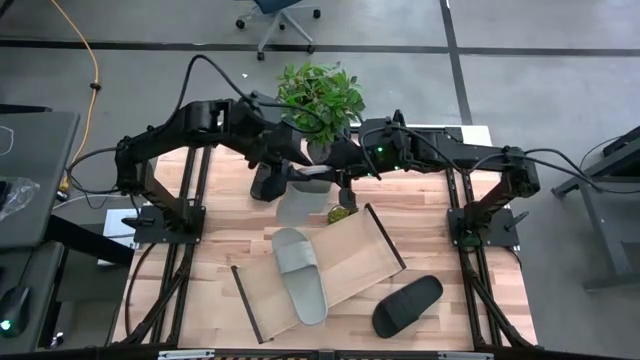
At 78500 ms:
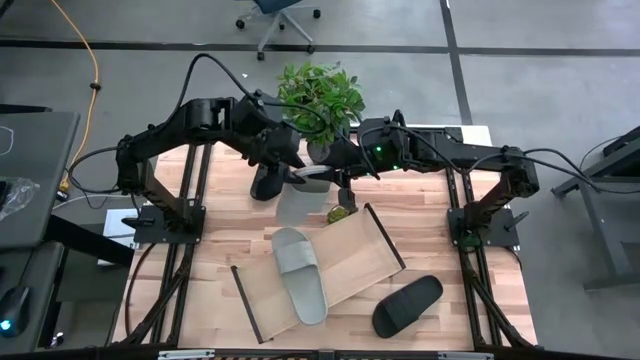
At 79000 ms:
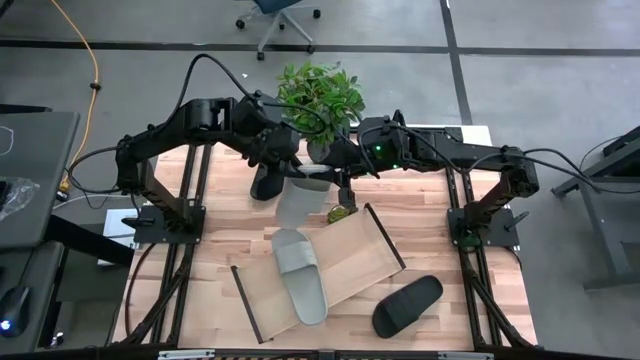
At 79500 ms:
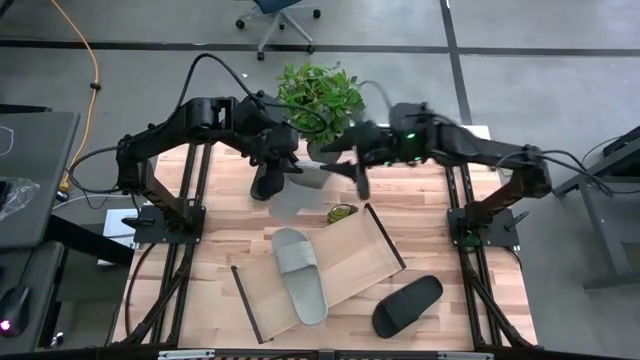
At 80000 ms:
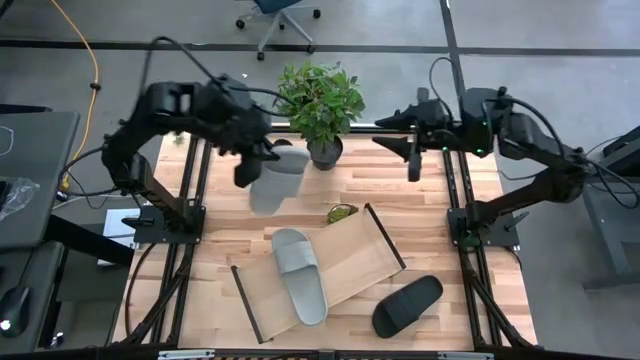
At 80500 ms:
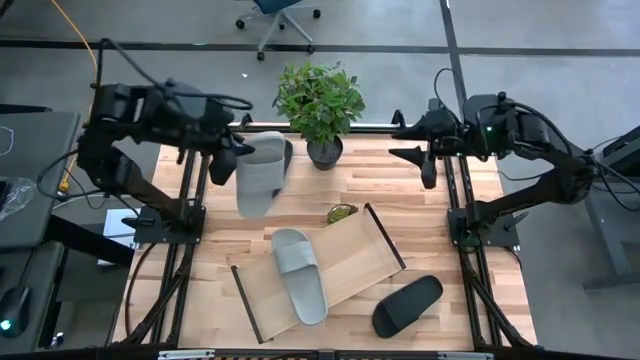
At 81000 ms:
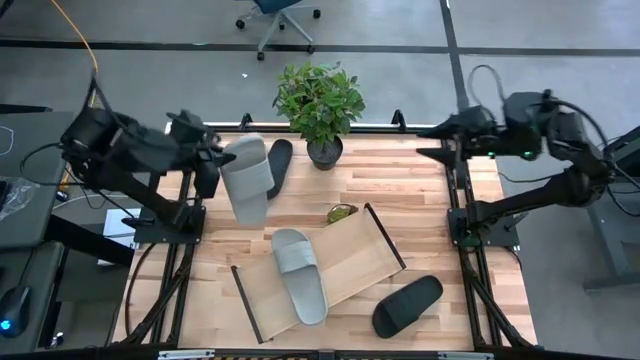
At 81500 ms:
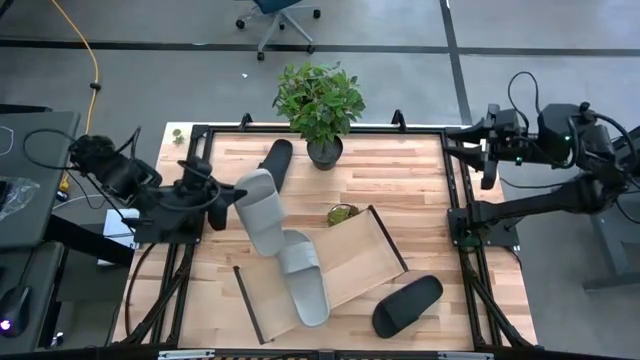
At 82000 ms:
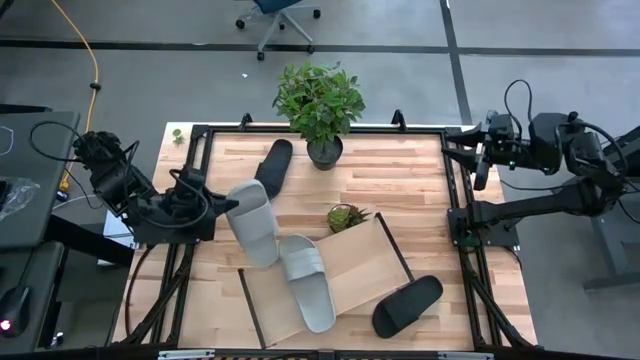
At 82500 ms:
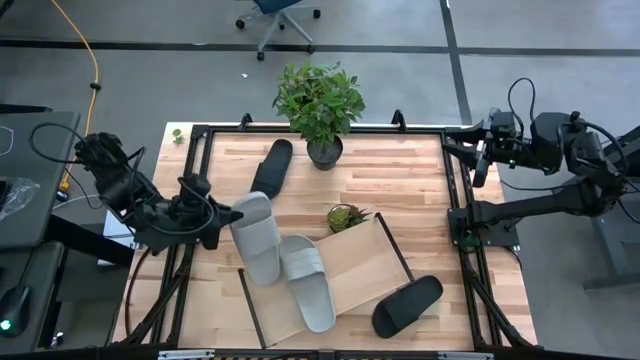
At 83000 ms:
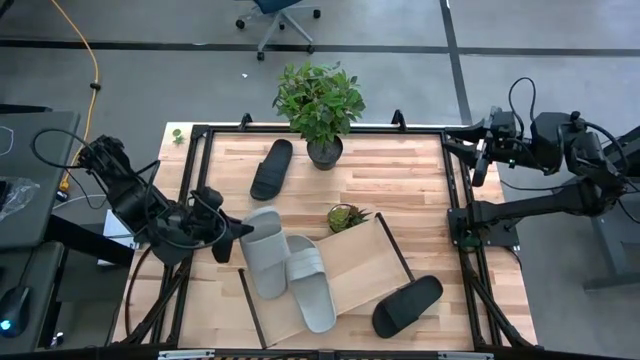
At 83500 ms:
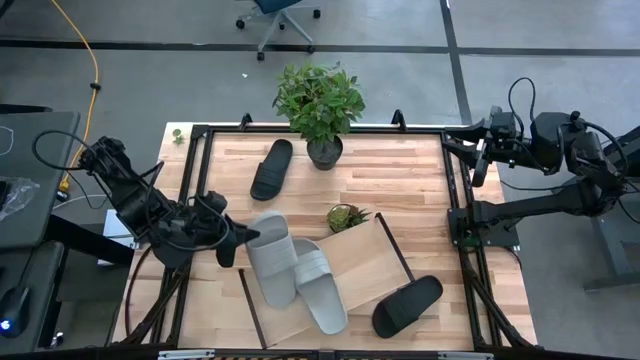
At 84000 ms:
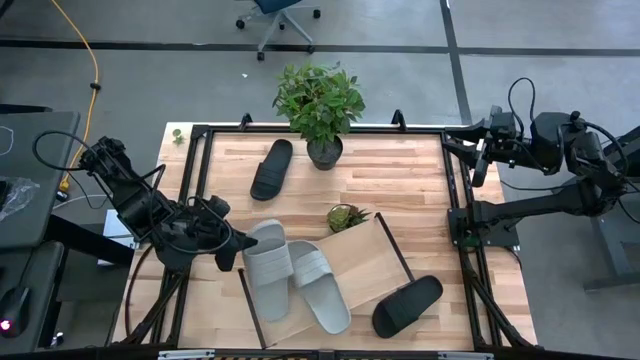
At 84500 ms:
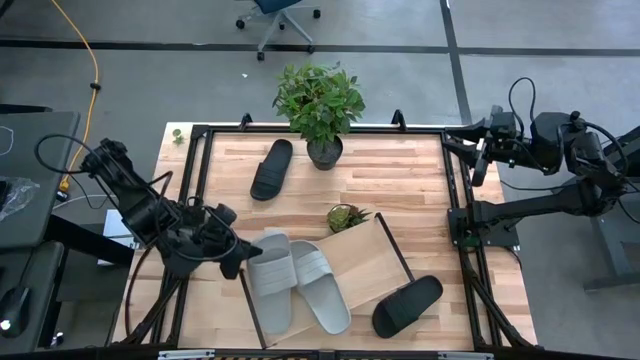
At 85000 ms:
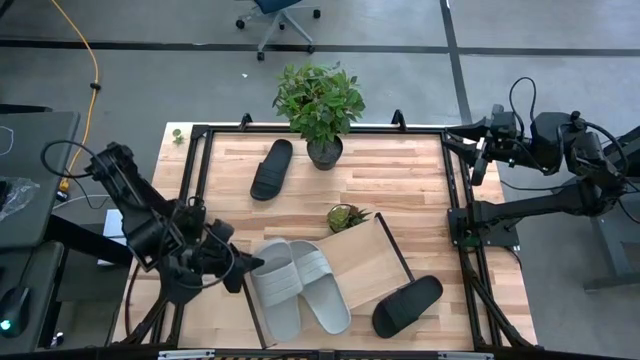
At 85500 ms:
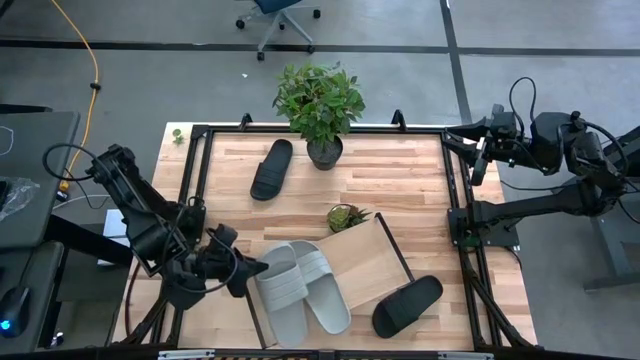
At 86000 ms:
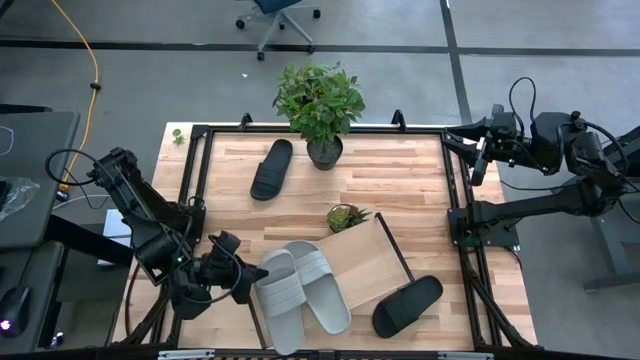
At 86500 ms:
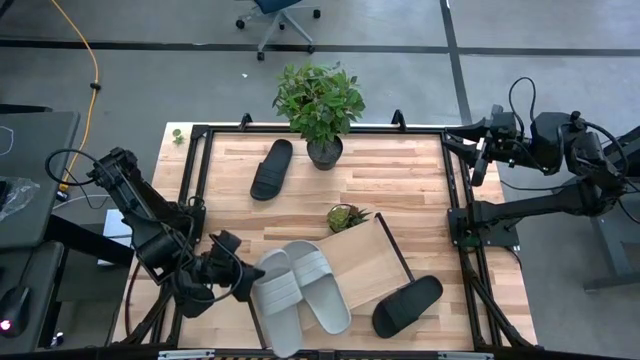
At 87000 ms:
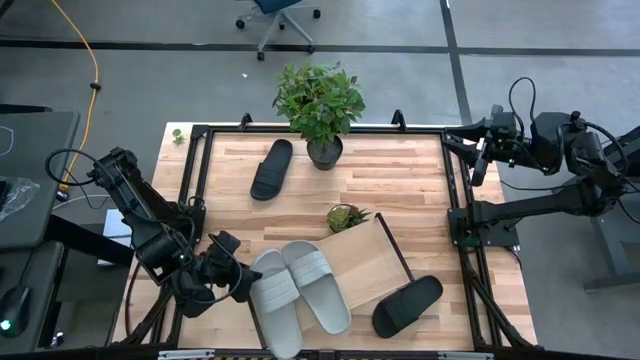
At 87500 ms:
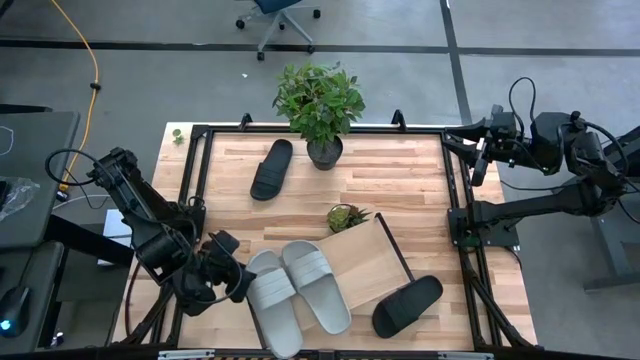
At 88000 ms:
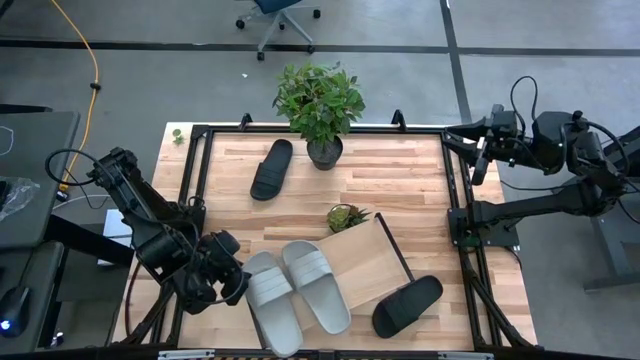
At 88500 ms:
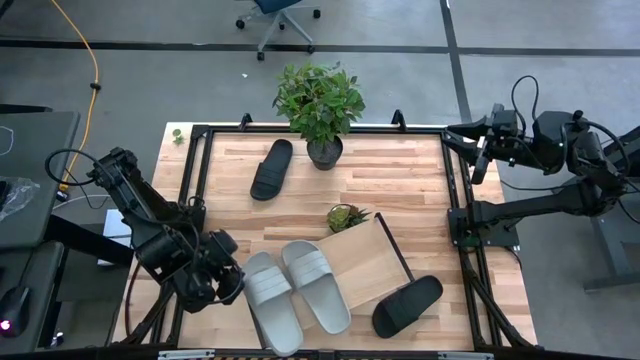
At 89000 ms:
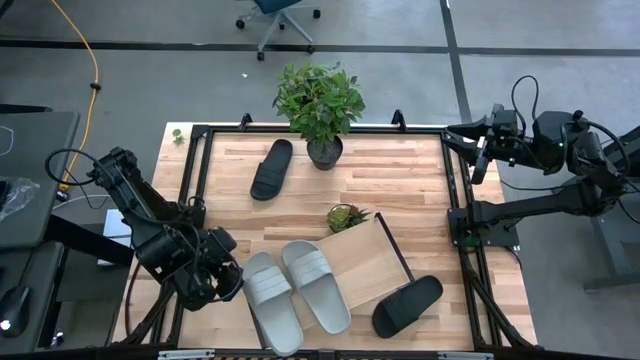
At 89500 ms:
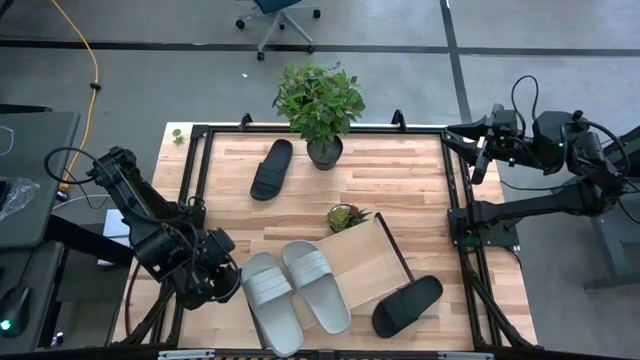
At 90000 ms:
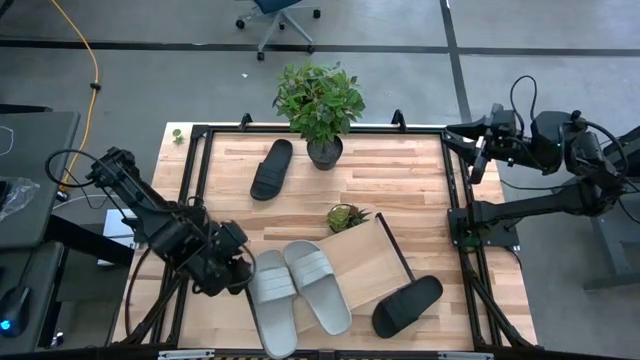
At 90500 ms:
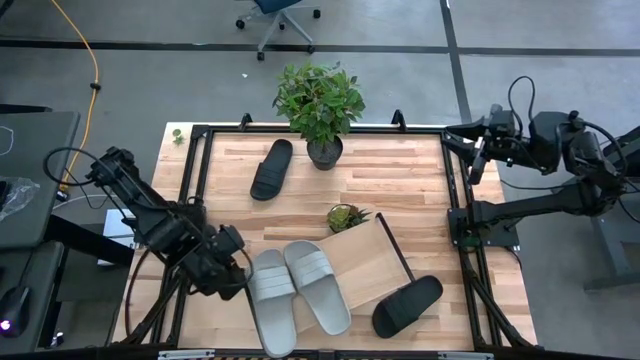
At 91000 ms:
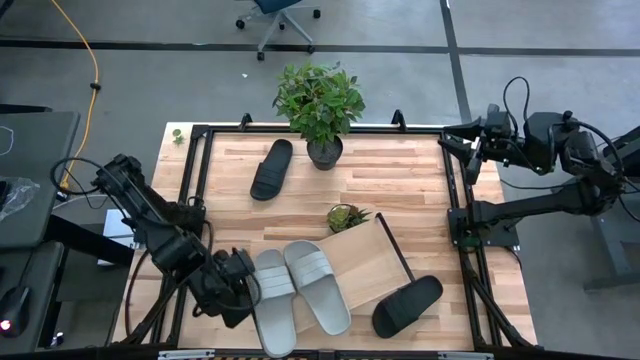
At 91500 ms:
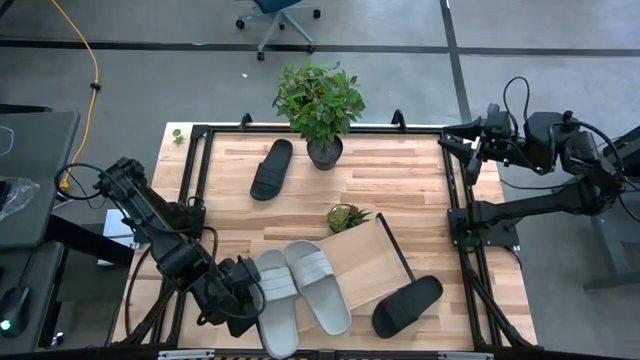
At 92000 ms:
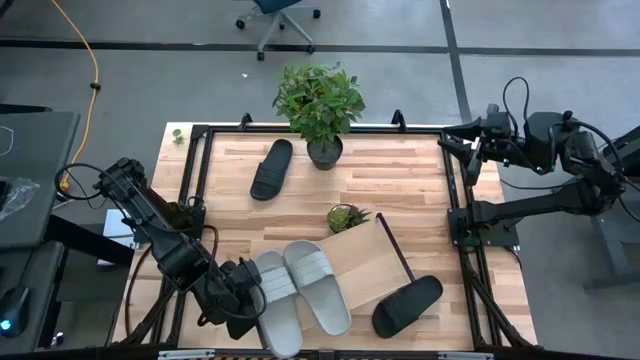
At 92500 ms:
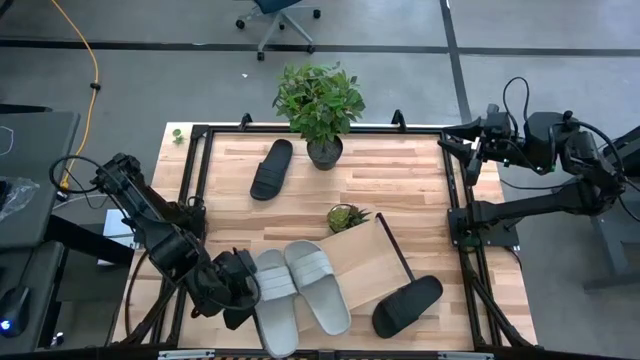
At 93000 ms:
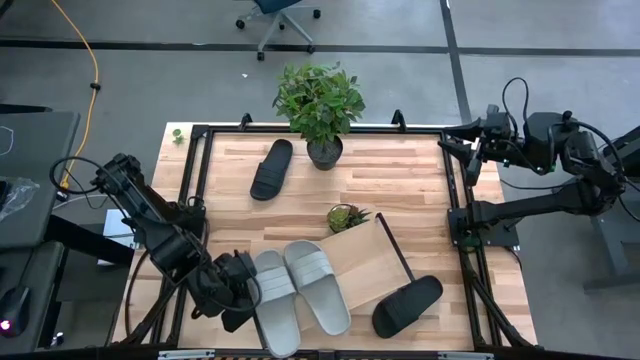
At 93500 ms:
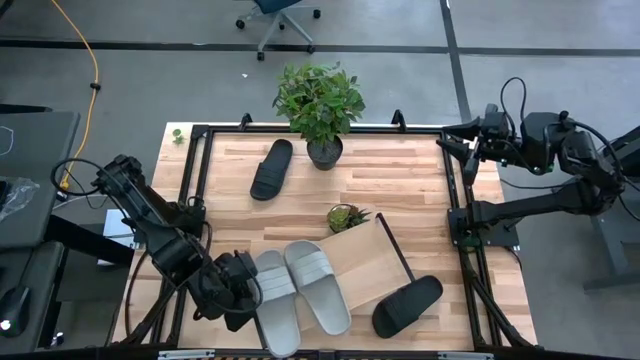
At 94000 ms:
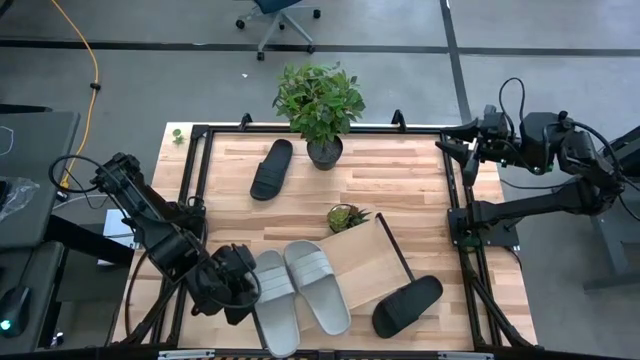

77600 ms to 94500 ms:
Task: Pick and place slides into the shelf
Put the gray slipper on the shelf

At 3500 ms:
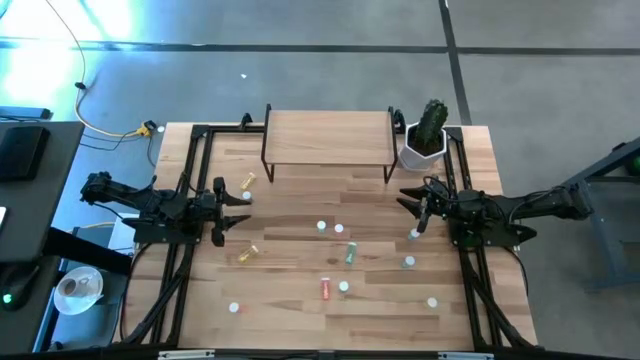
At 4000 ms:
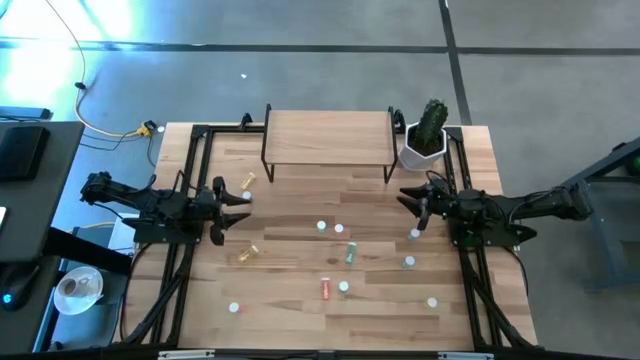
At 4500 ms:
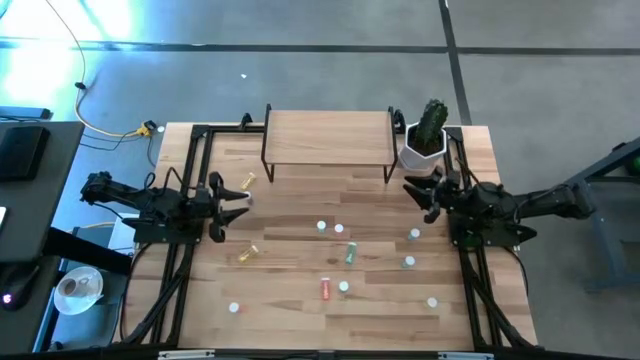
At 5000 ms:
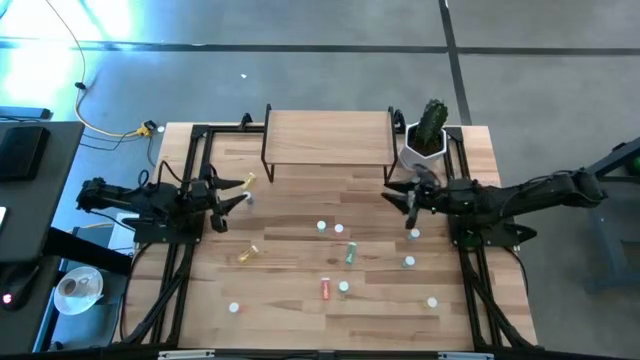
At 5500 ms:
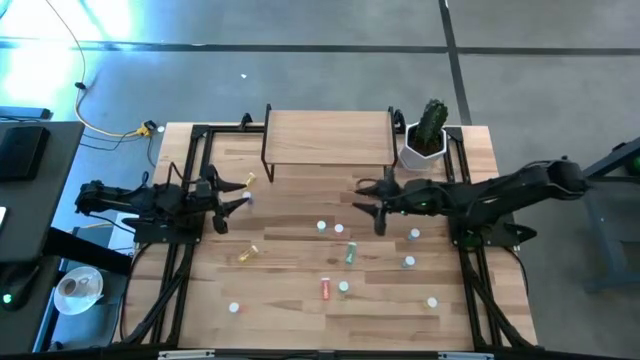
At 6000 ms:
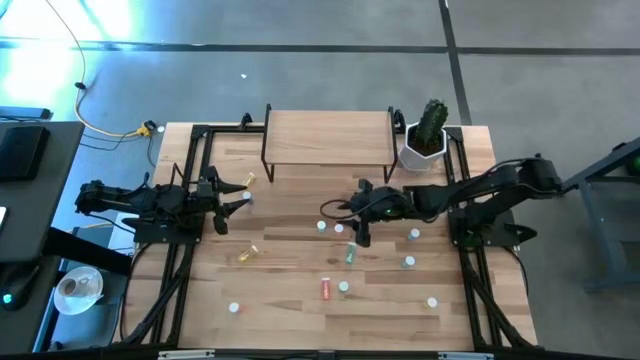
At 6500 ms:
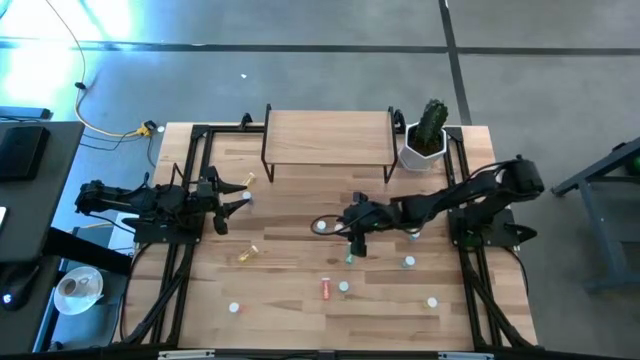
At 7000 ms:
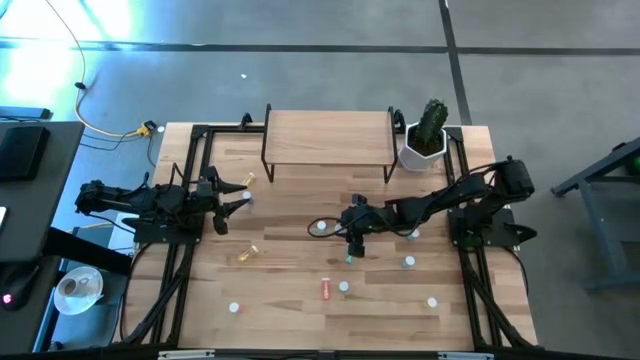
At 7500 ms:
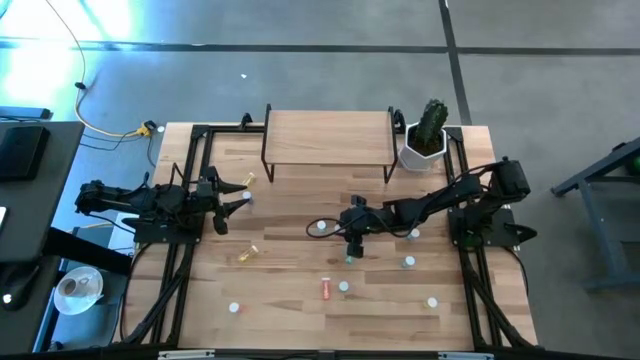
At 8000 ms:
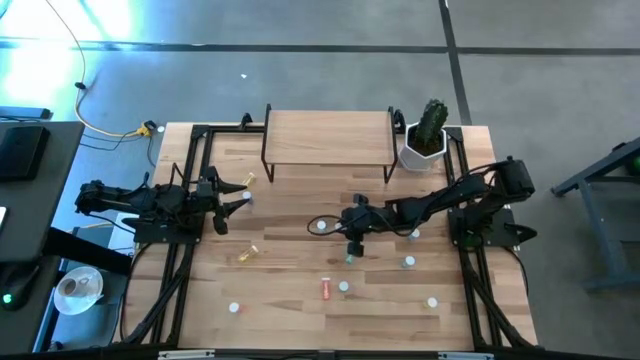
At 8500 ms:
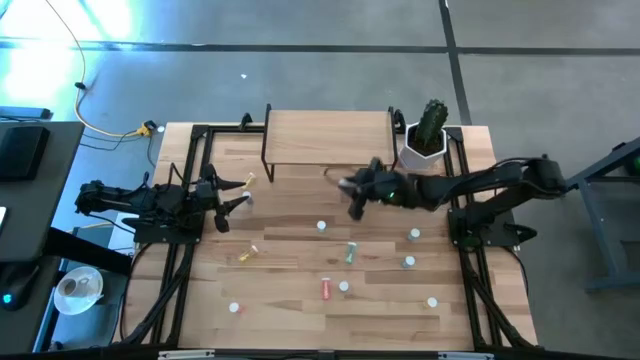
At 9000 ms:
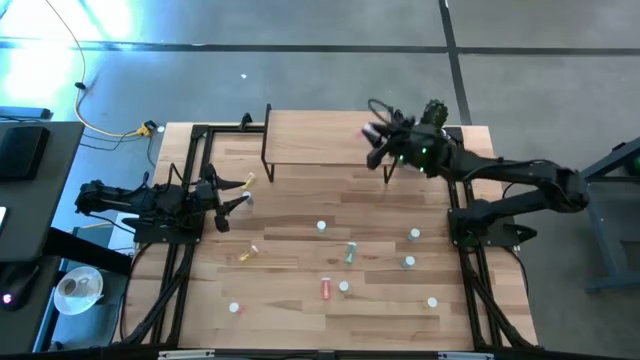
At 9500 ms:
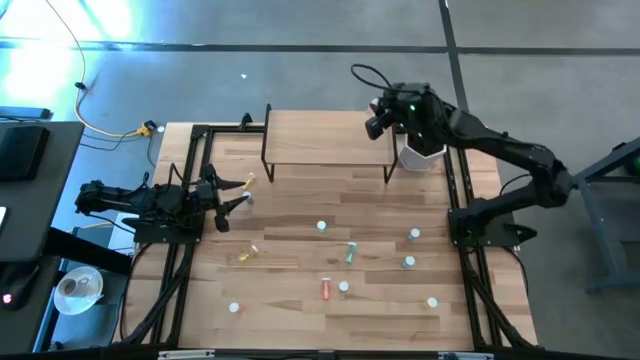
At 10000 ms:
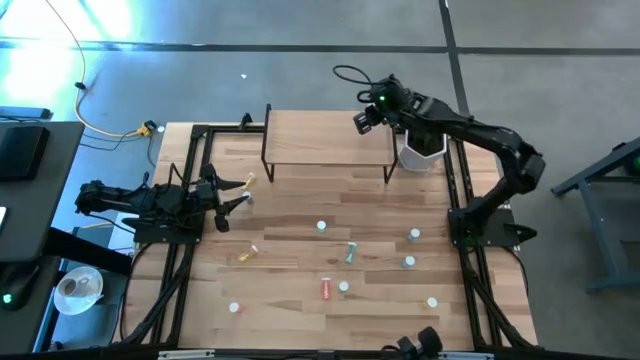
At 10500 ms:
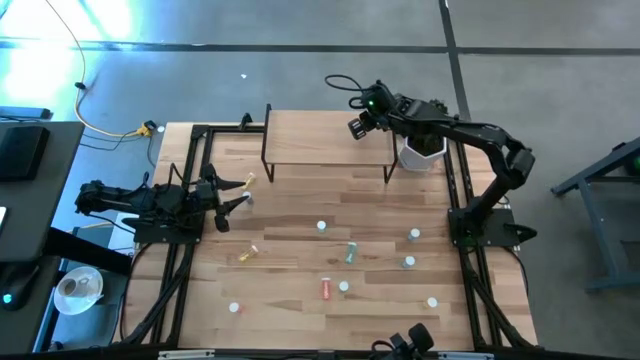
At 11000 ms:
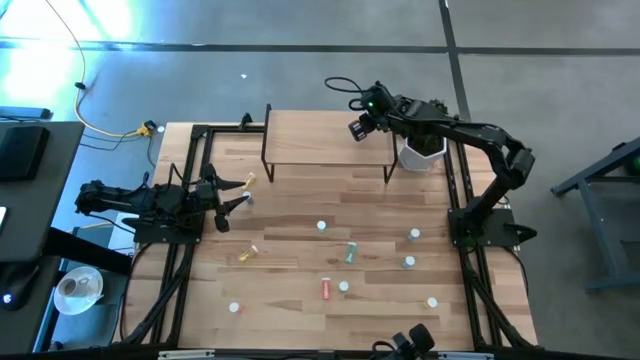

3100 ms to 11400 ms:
Task: Pick and place medicine bottles onto shelf by color
Put the pink pill bottle on the shelf
